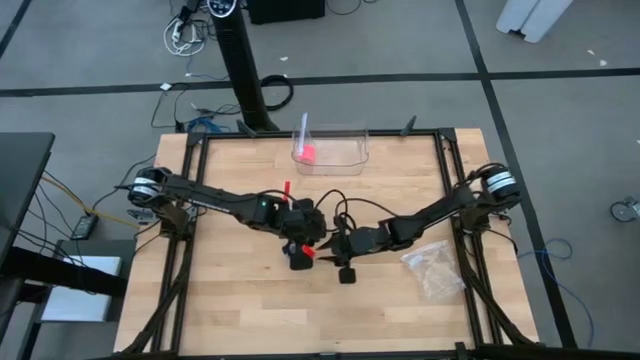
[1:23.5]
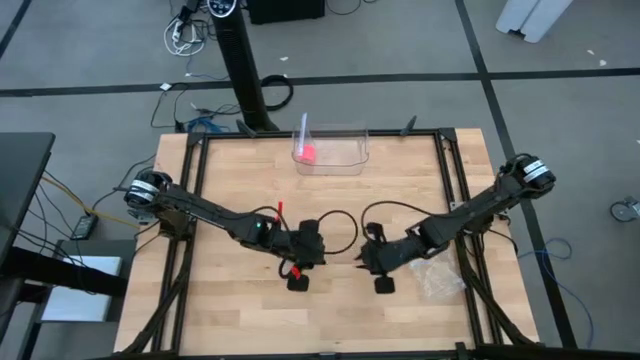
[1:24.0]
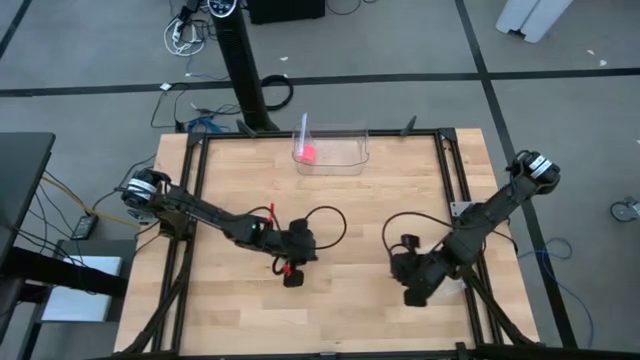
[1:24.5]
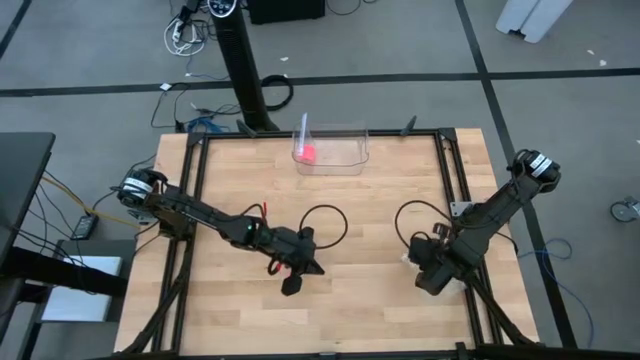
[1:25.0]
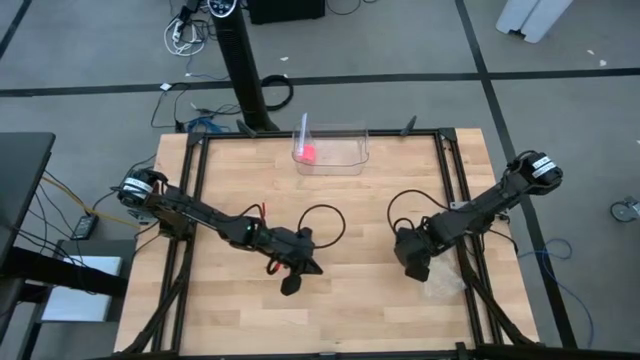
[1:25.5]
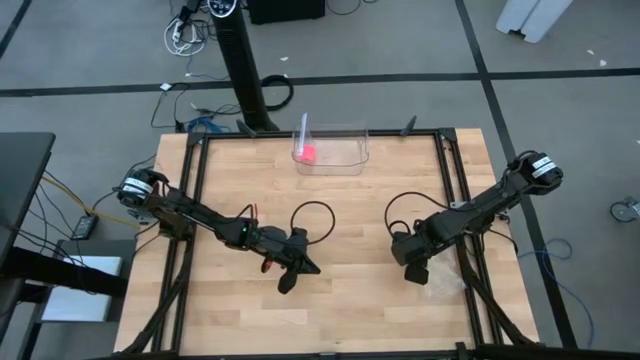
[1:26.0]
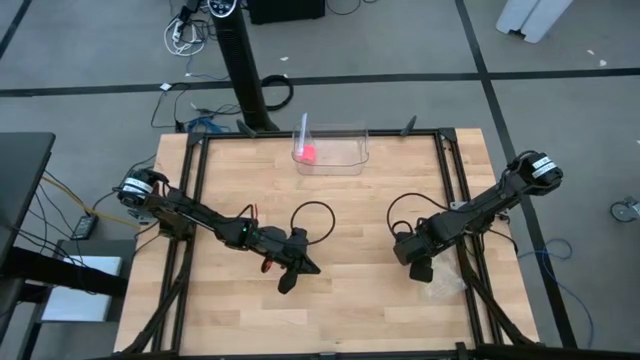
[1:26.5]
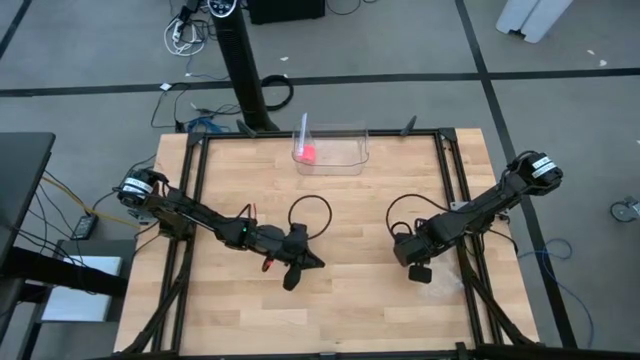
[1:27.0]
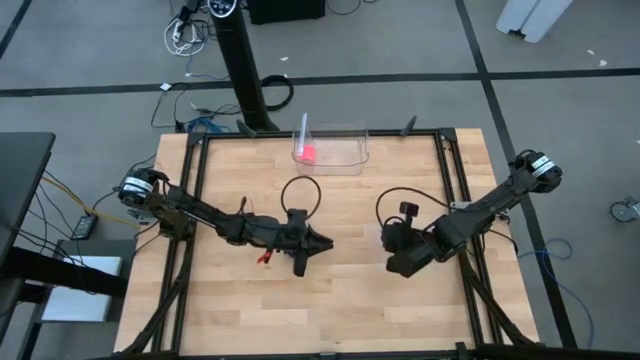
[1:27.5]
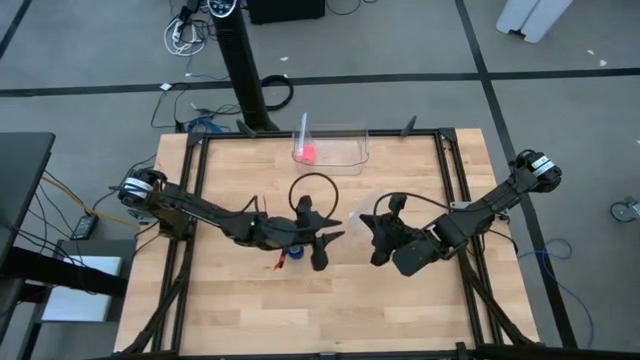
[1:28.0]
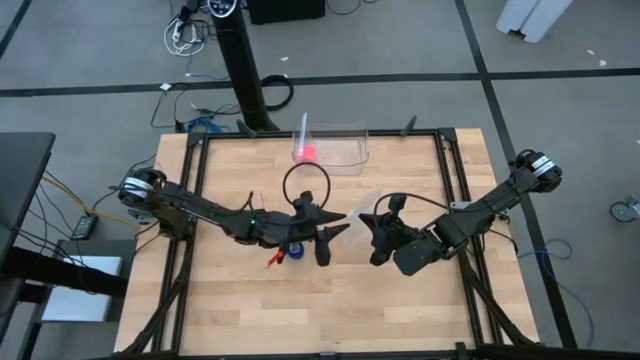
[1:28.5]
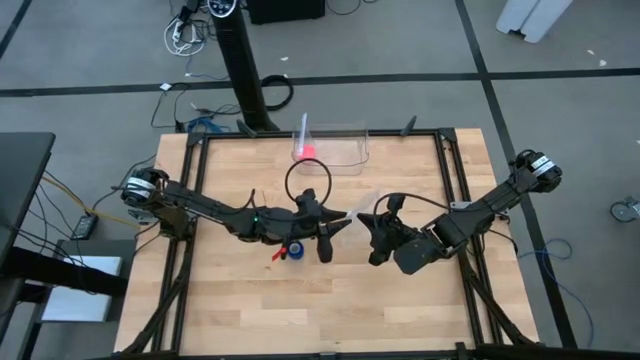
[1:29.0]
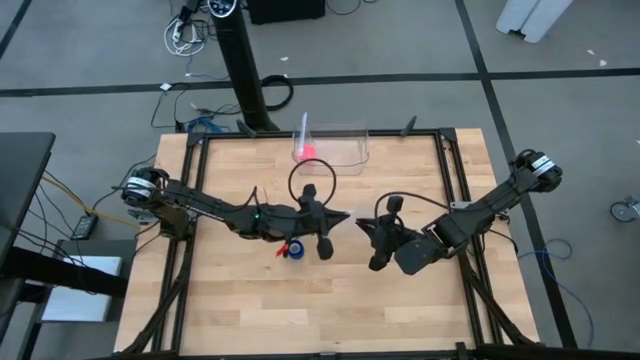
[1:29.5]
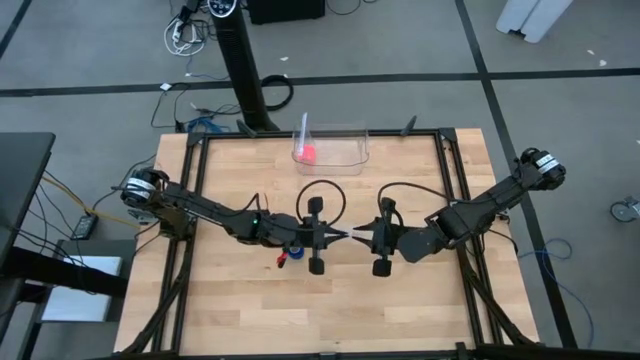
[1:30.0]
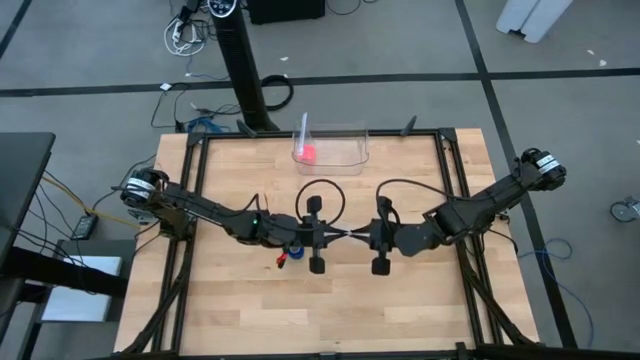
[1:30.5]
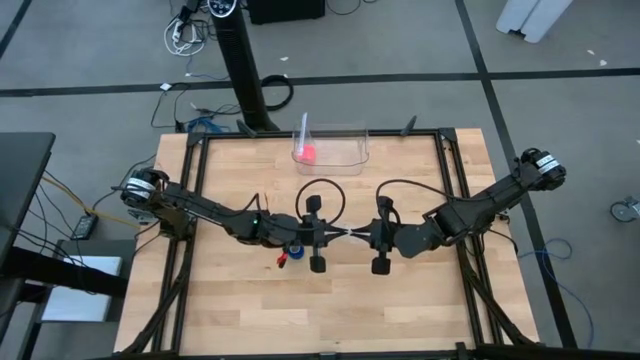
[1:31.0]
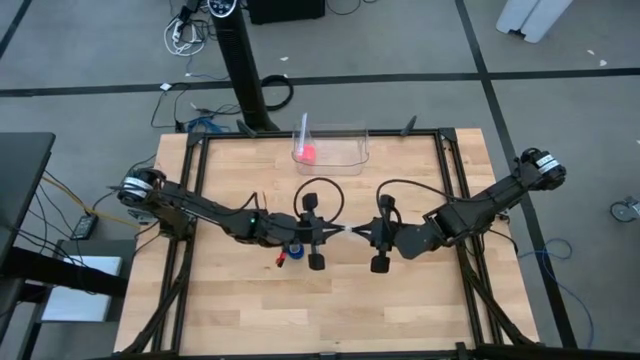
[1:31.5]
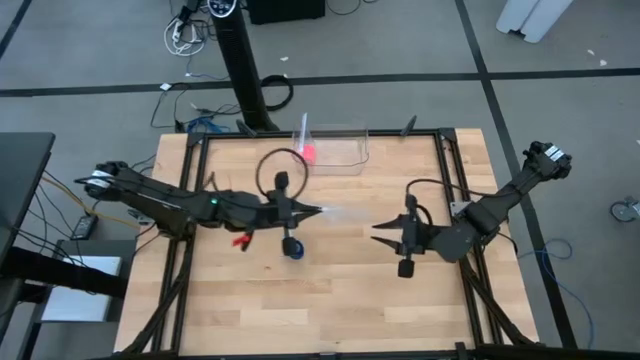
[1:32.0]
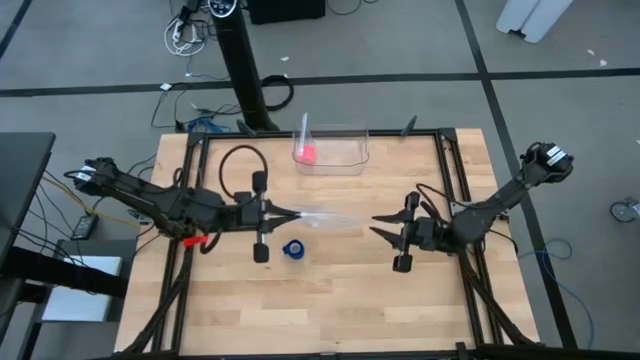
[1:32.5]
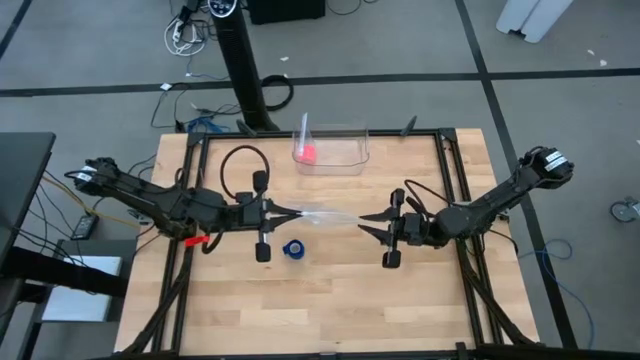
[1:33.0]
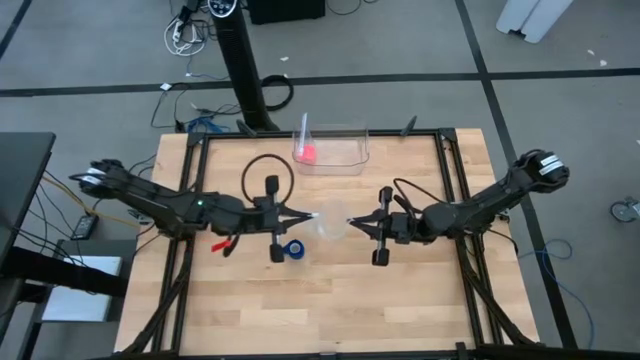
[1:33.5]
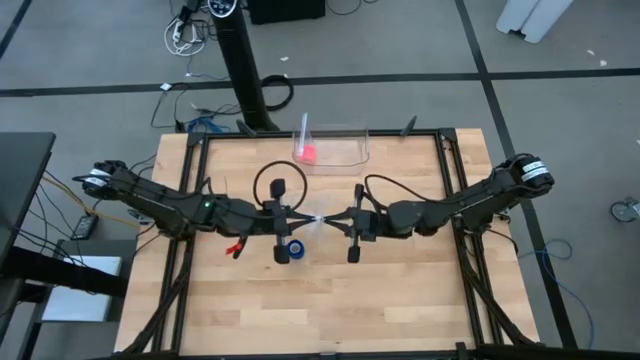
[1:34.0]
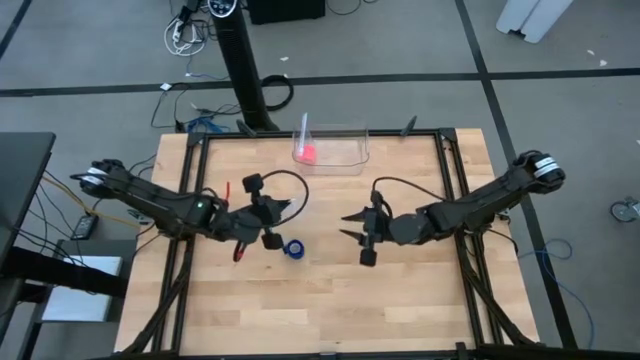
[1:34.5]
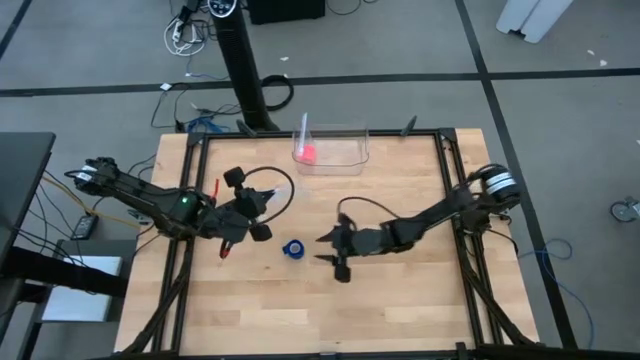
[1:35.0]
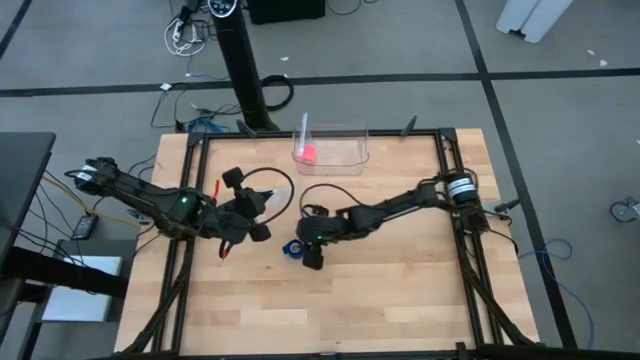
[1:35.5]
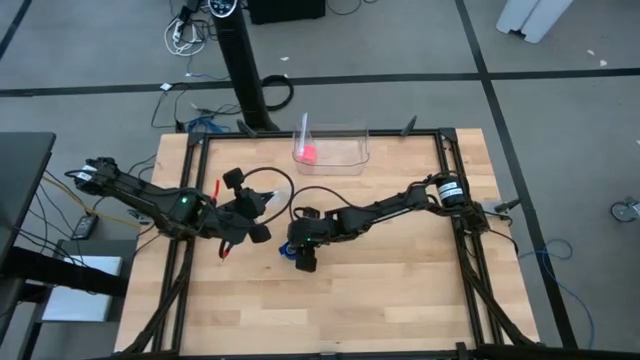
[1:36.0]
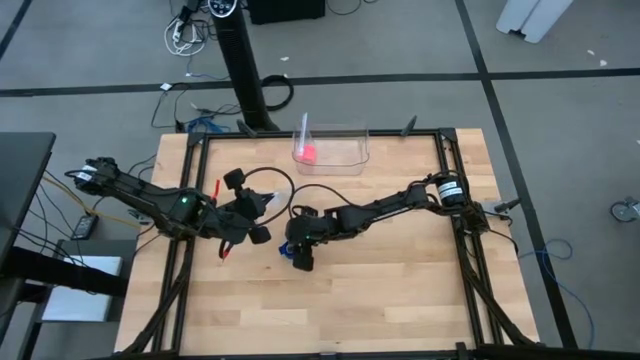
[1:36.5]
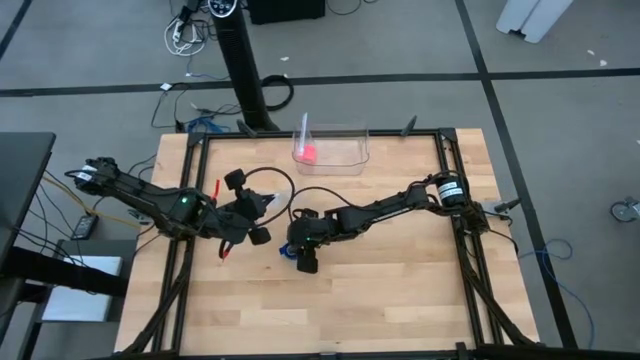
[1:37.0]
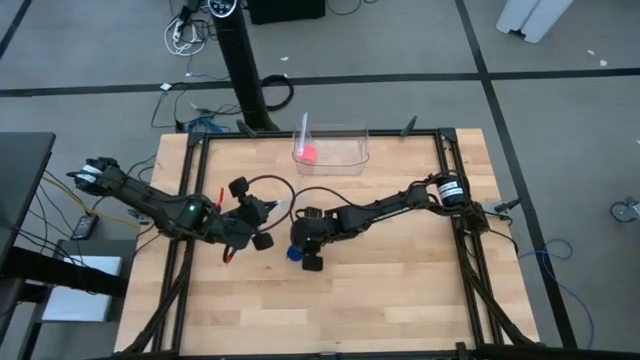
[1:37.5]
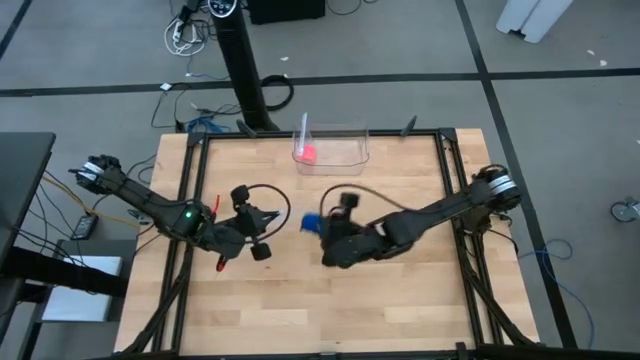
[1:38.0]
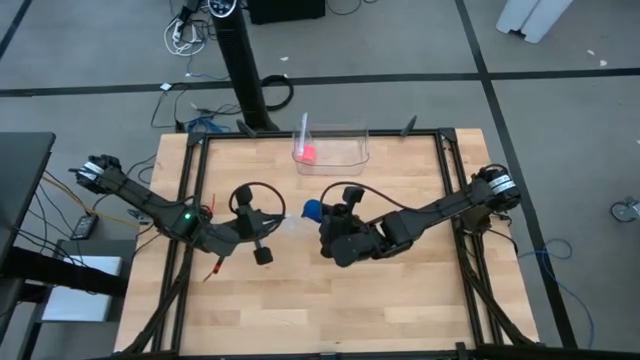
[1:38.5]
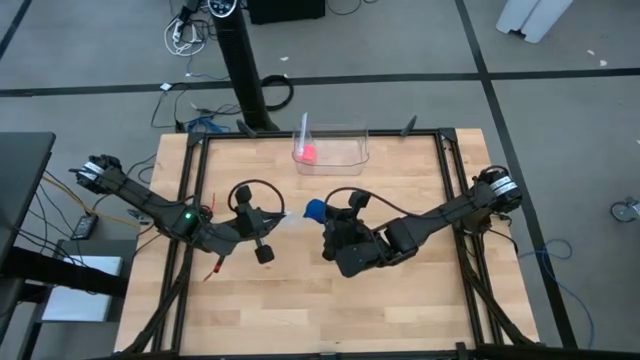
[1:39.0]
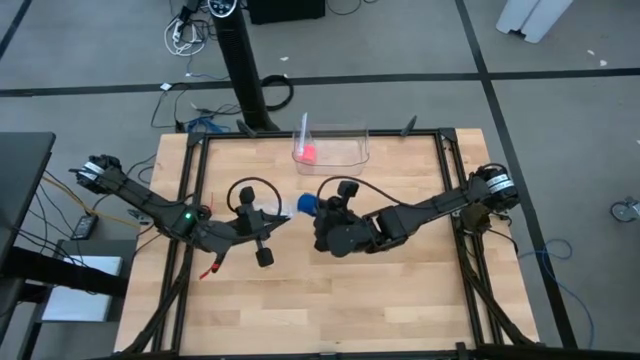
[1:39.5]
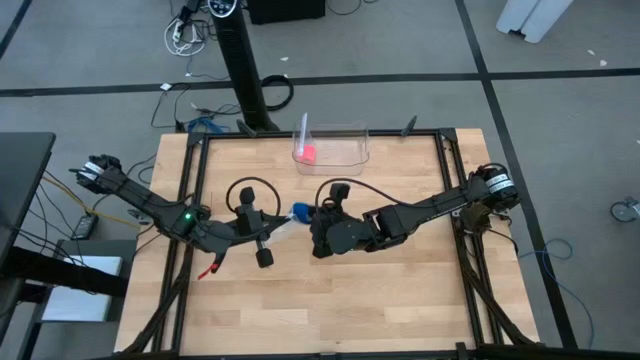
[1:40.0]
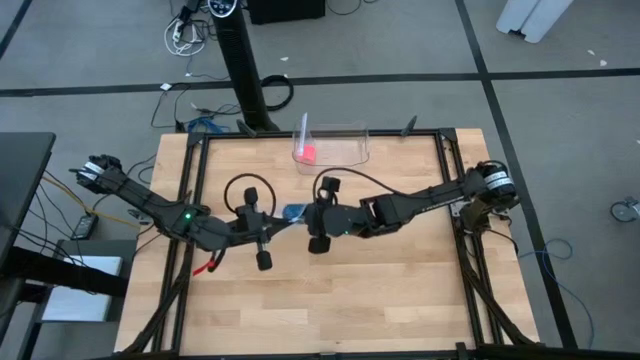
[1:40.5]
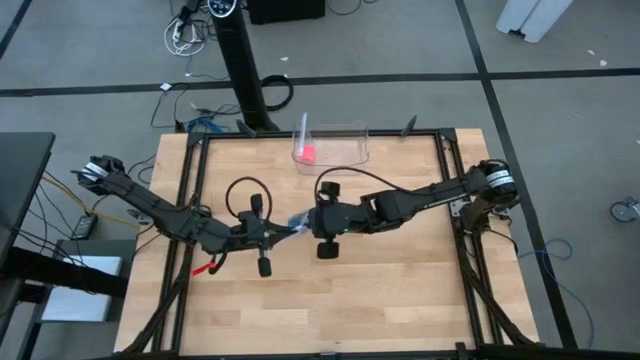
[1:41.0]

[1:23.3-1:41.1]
Task: Roll bandage
Put the rolled blue bandage into the transparent zip bag

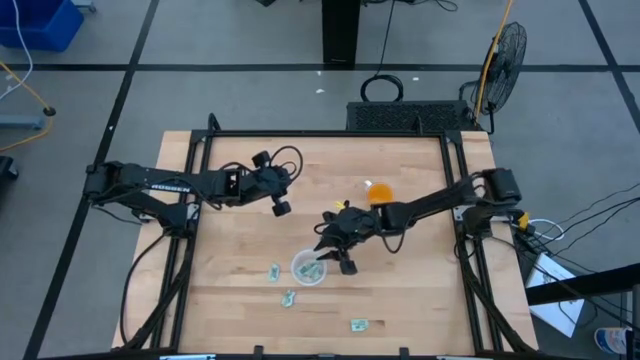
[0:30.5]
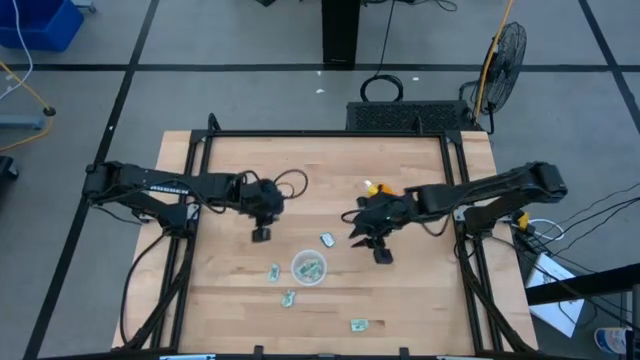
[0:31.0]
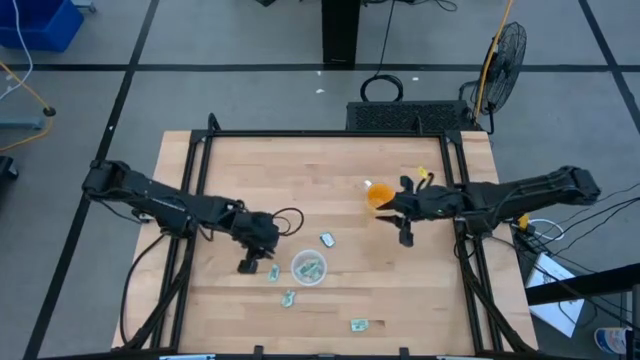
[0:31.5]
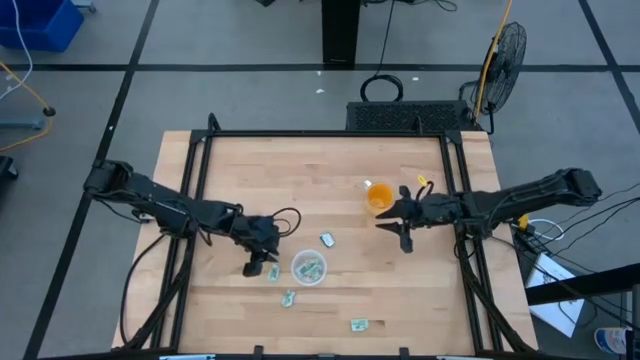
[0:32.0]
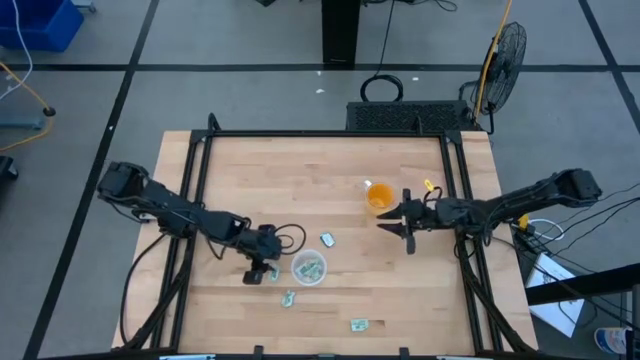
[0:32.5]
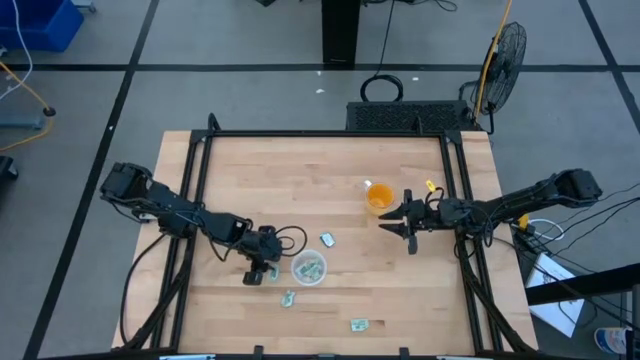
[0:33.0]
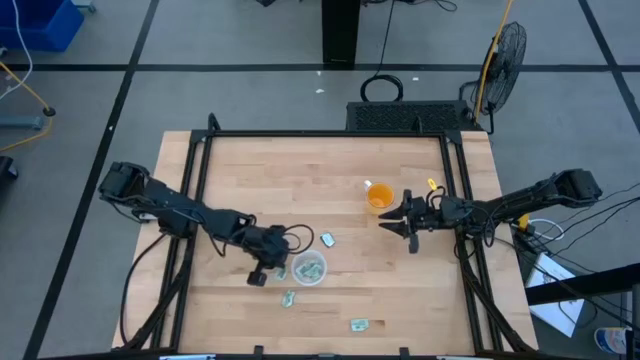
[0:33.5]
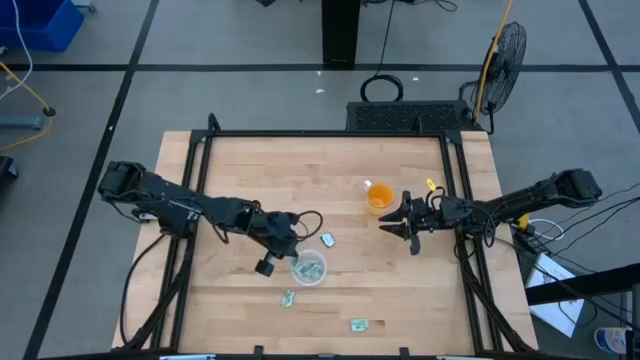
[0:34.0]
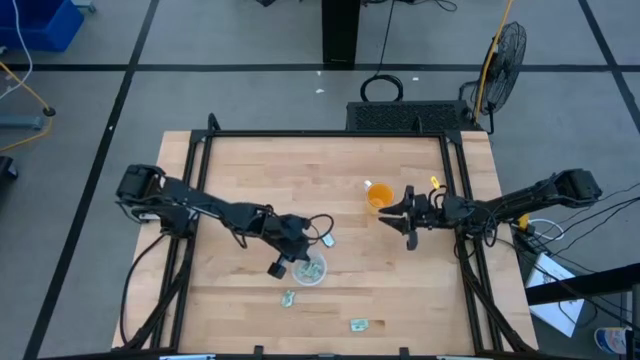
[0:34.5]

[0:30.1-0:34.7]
Task: Pick and place items into bin
Put the white stevia packet into the transparent bin
